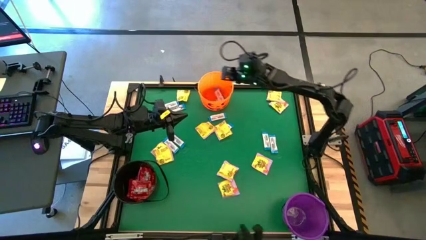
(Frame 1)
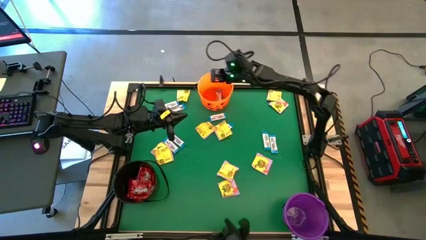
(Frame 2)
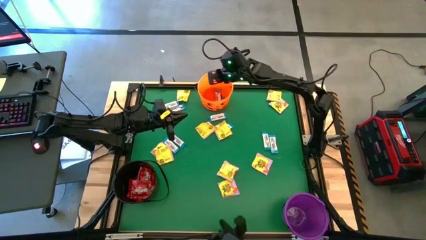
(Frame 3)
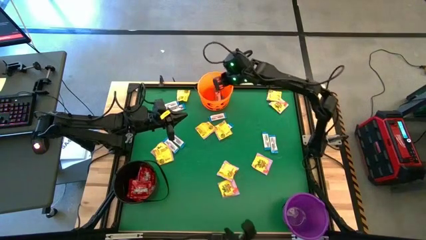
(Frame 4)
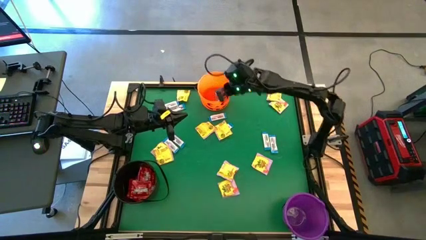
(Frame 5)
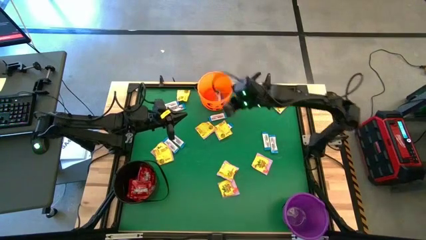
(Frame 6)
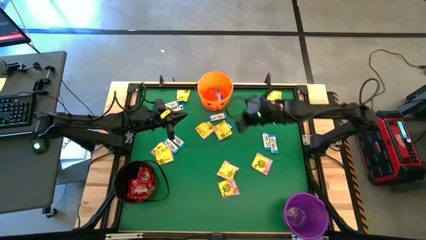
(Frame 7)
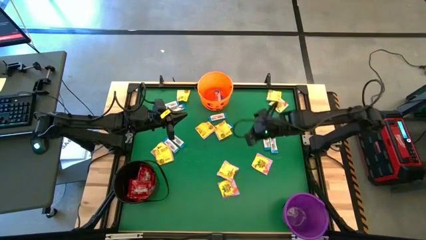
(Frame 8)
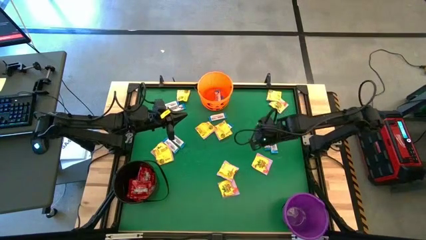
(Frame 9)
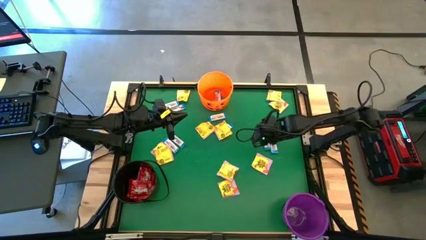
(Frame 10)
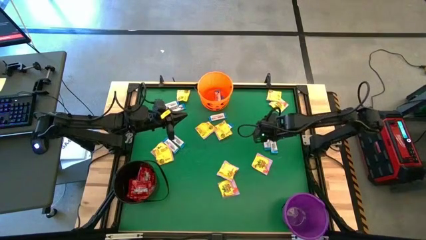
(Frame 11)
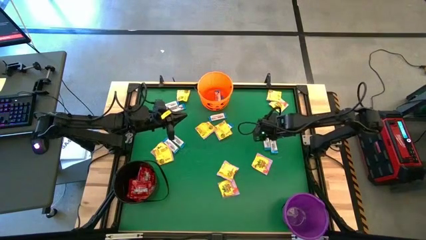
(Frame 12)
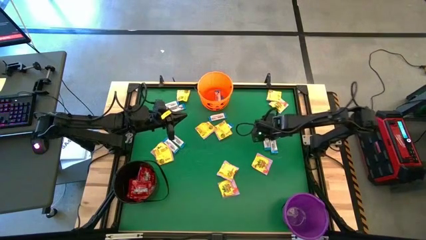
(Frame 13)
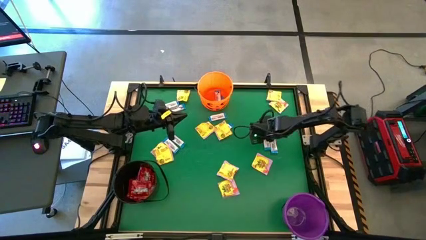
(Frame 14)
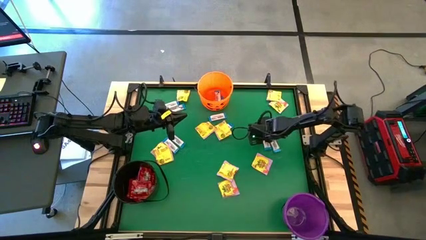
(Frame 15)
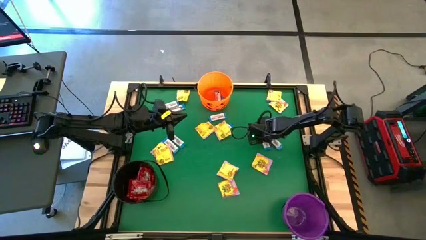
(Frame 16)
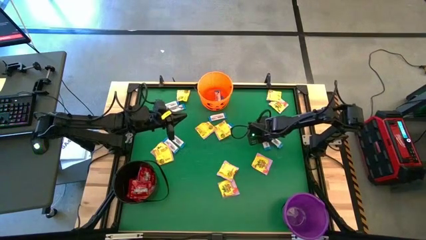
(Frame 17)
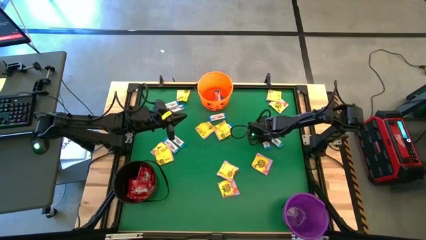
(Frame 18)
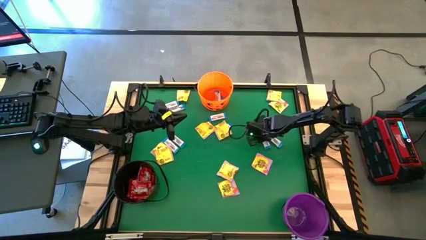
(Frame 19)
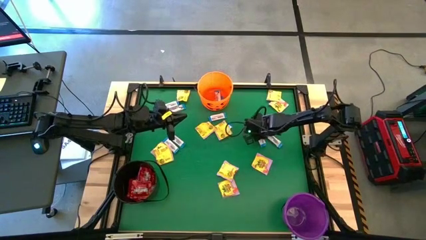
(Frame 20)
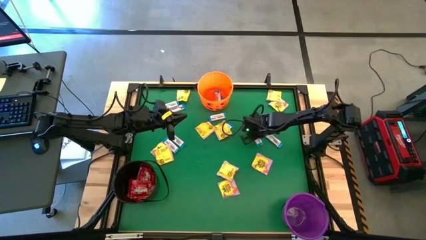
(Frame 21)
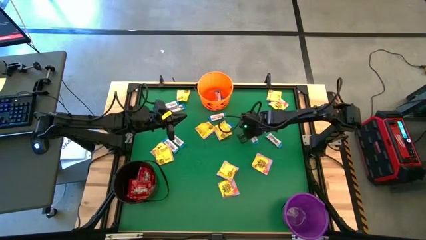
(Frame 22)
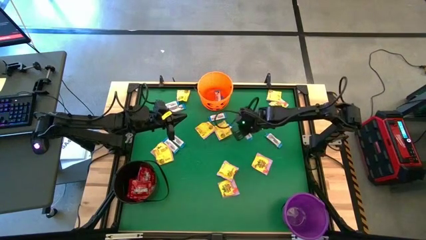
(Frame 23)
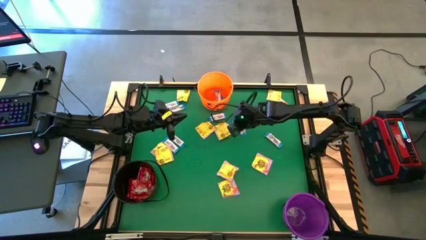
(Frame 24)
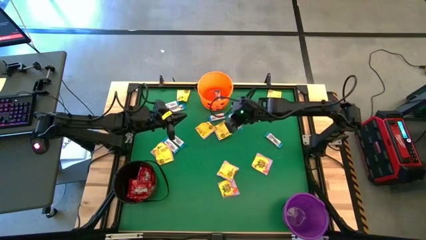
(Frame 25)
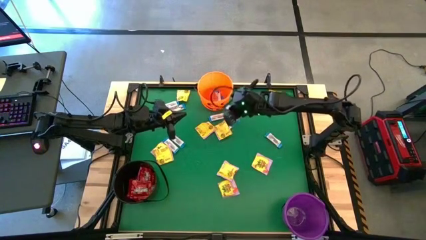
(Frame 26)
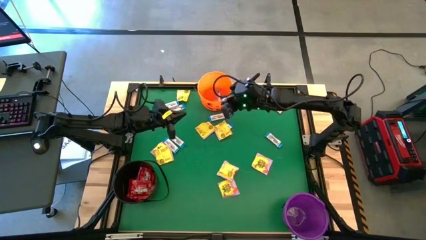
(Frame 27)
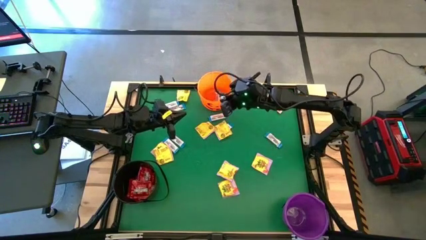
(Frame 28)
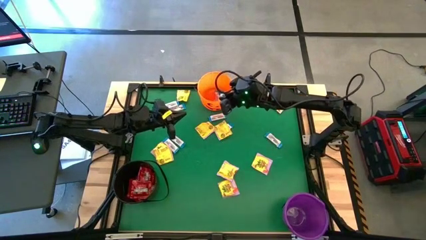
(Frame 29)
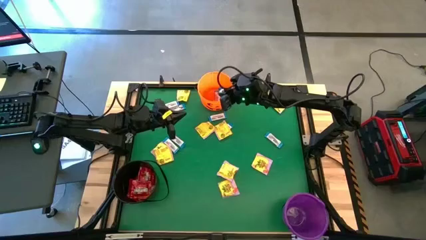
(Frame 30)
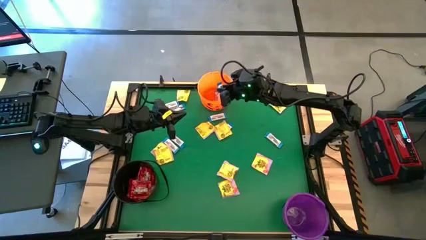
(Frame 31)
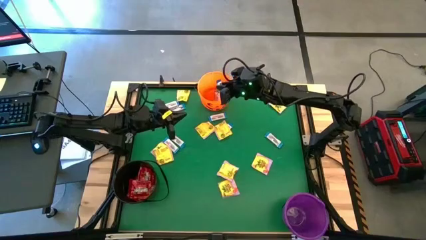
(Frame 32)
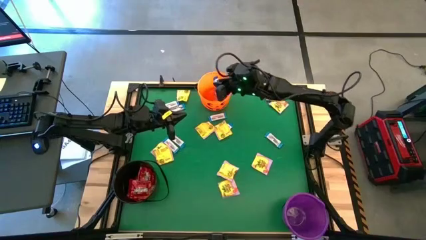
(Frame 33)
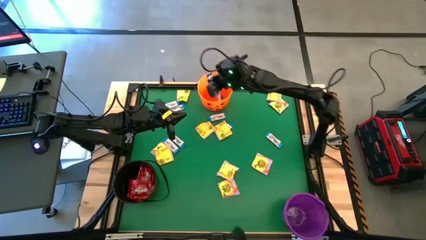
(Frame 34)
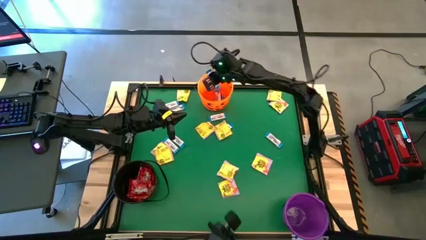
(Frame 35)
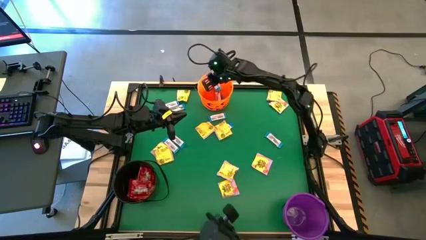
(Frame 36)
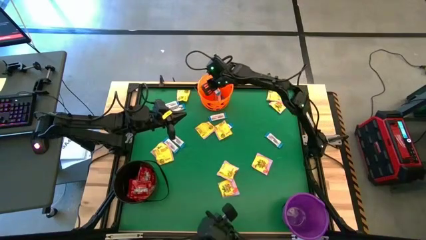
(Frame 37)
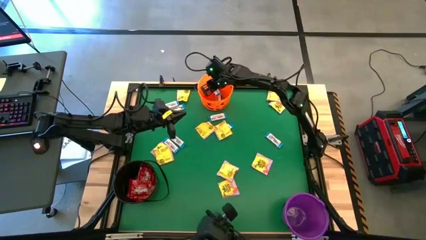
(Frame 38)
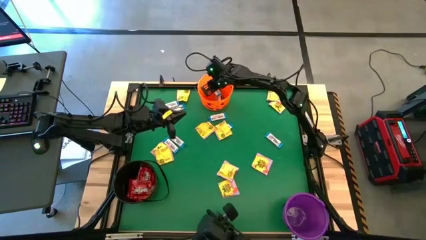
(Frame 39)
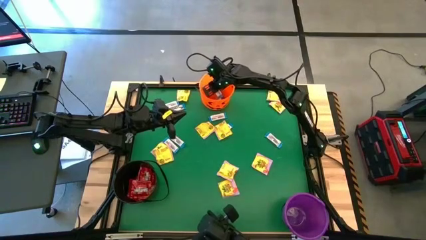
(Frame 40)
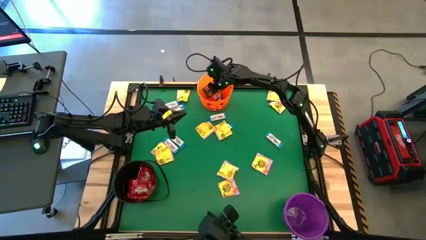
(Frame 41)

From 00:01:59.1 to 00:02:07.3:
Task: Sort candy by brand, put in halloween buckets
Put the white chocolate into the orange bucket

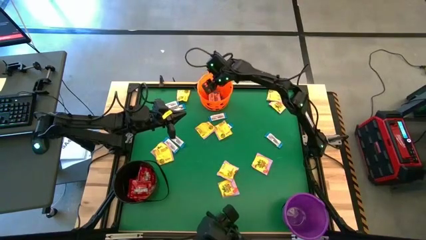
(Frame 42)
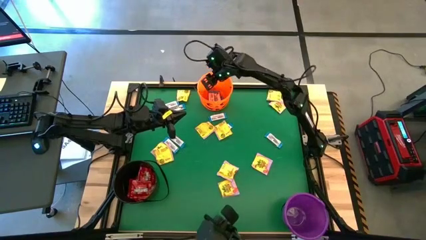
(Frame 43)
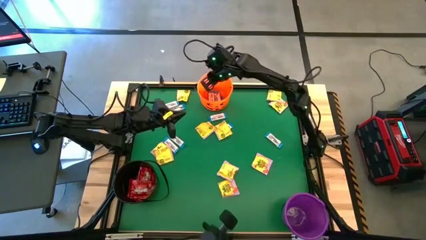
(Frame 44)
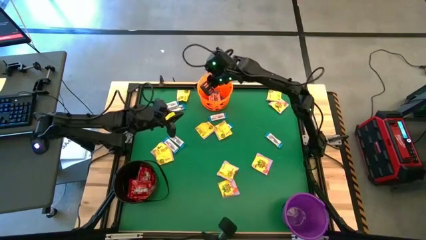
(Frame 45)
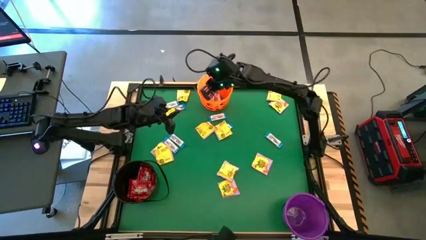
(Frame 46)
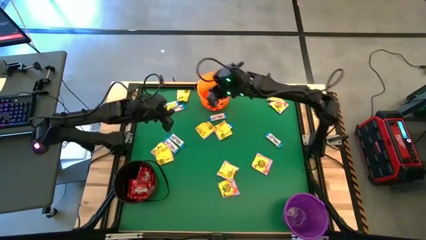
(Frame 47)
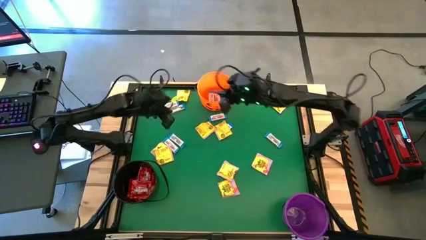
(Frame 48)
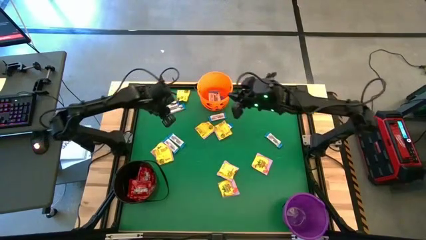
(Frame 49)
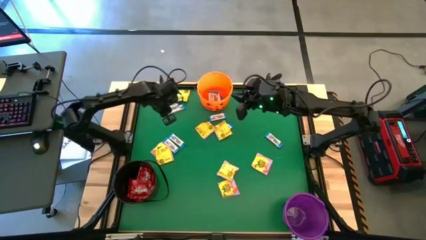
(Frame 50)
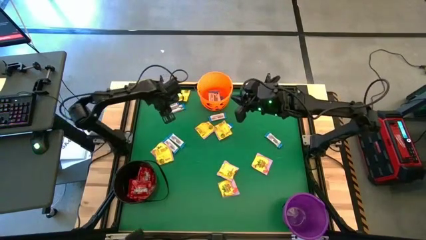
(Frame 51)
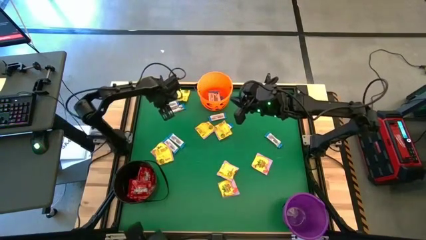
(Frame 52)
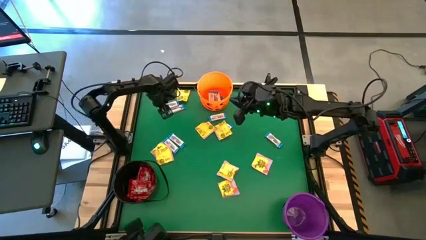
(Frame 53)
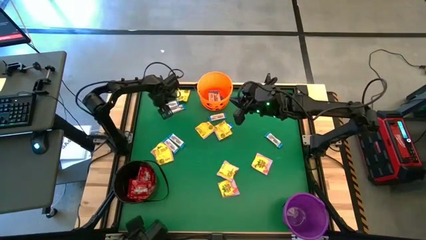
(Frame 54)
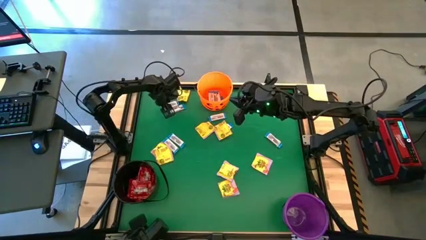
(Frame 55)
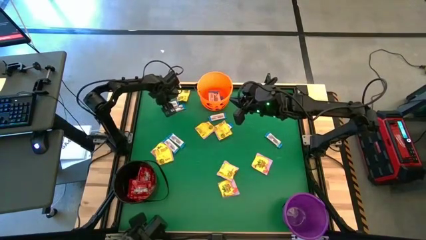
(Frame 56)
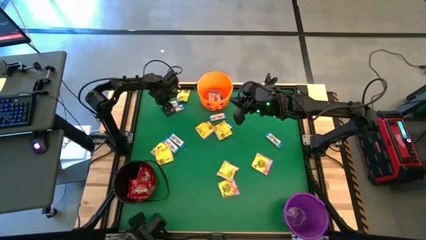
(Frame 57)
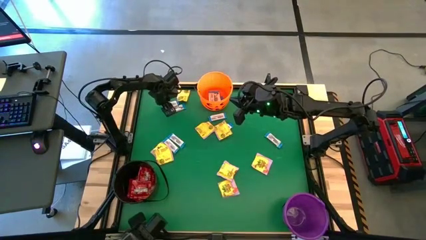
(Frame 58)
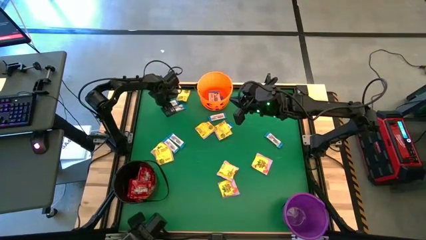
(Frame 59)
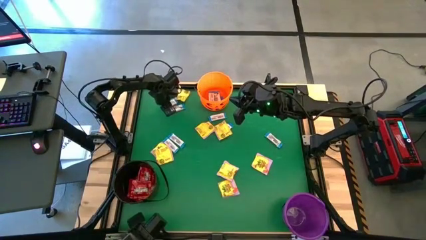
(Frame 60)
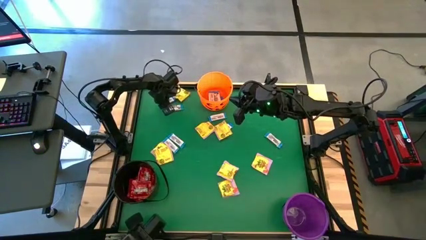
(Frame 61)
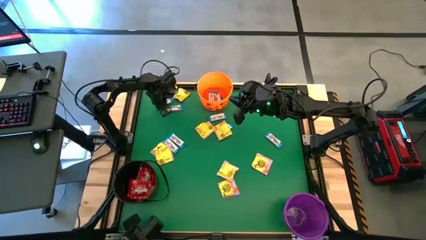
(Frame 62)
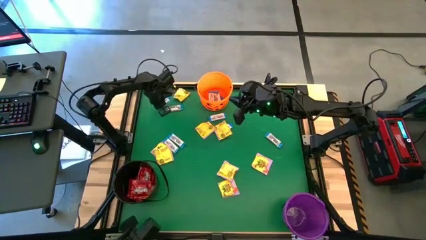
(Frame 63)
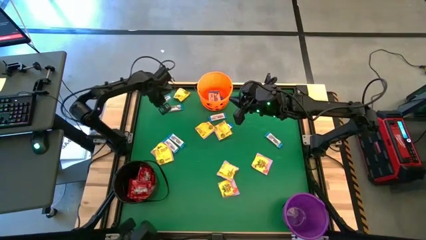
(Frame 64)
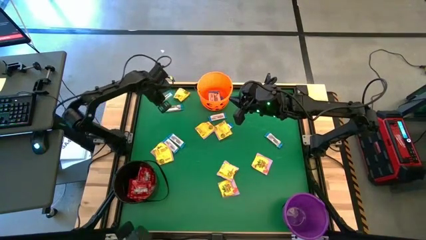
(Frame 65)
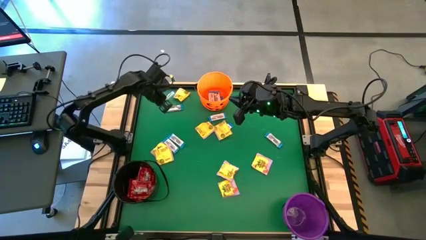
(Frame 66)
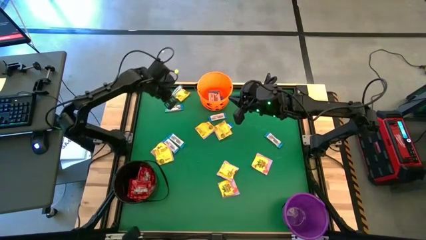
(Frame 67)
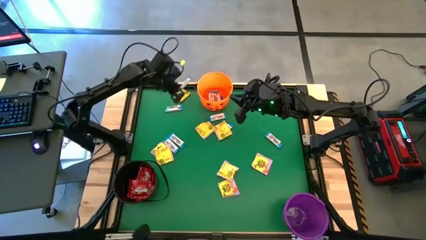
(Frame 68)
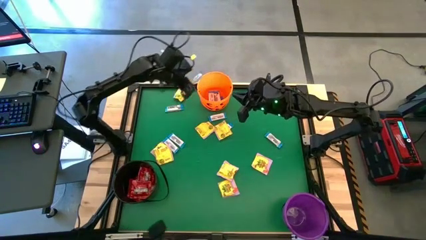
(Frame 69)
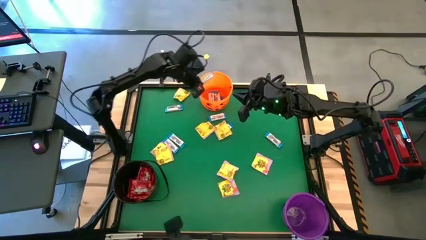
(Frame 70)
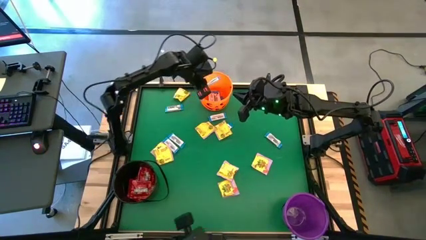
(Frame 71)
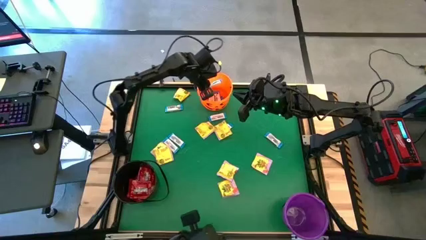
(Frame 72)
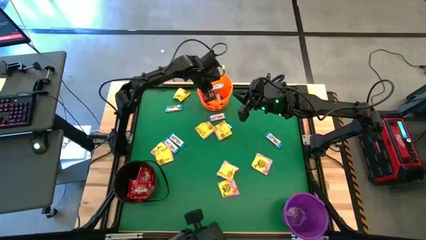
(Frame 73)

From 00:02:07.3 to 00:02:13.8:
Put the white chocolate into the orange bucket

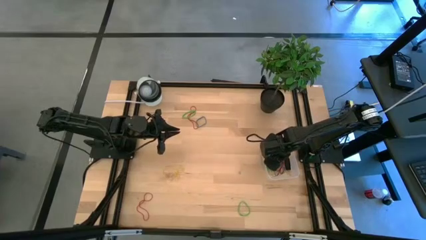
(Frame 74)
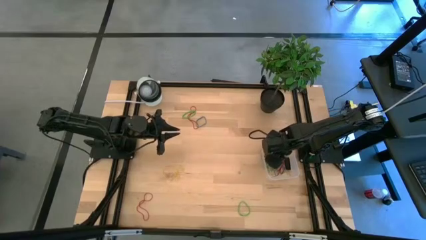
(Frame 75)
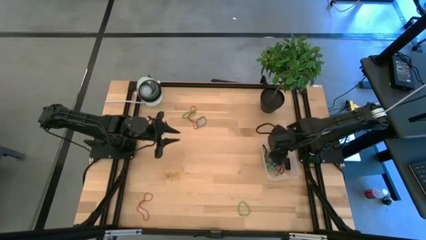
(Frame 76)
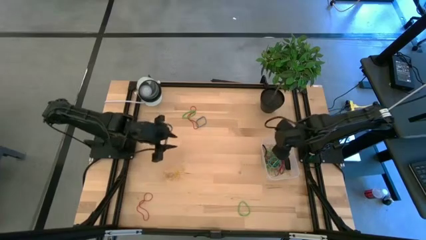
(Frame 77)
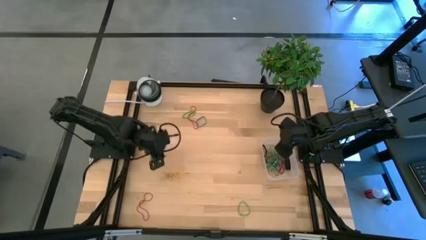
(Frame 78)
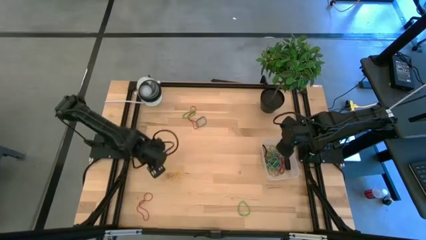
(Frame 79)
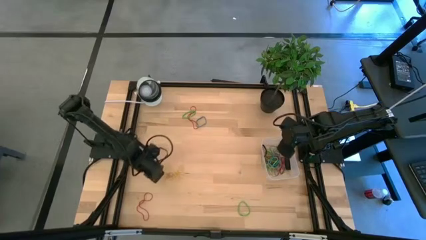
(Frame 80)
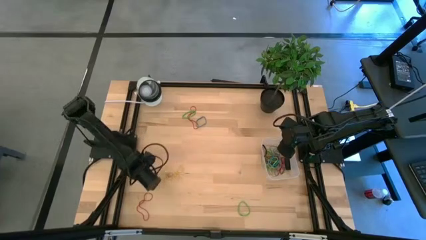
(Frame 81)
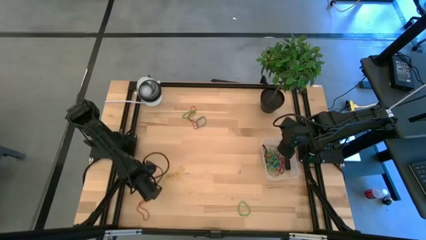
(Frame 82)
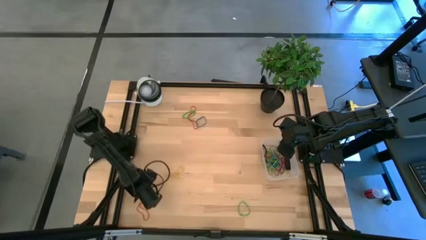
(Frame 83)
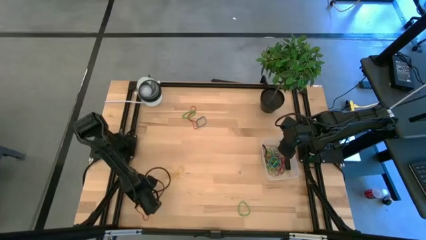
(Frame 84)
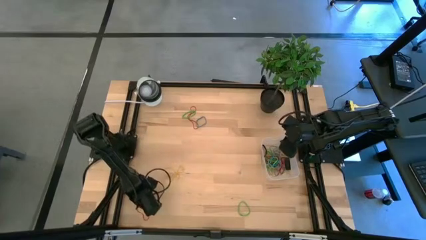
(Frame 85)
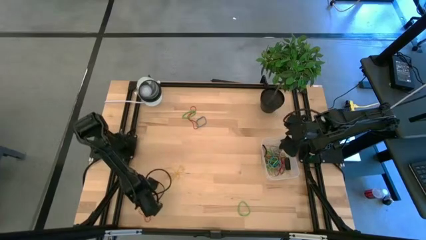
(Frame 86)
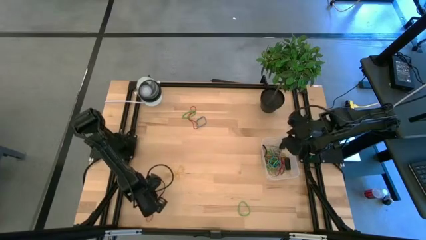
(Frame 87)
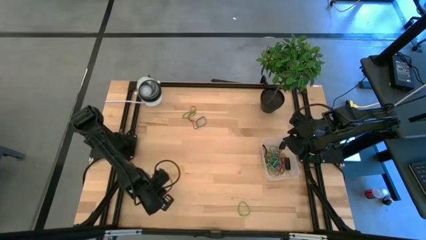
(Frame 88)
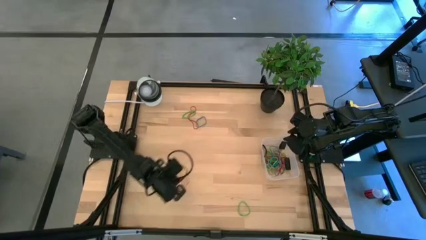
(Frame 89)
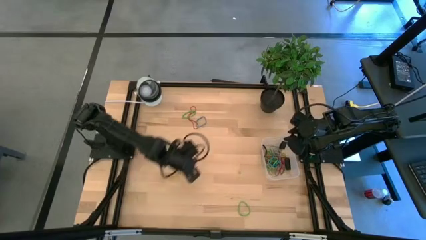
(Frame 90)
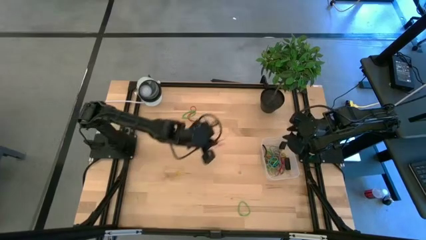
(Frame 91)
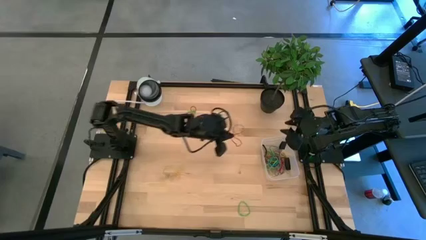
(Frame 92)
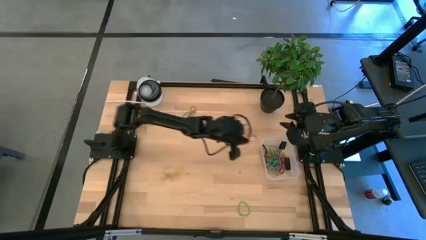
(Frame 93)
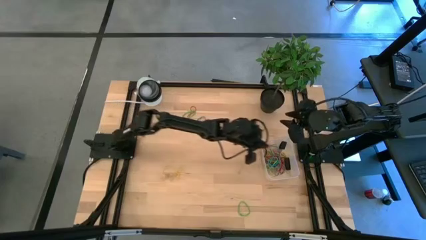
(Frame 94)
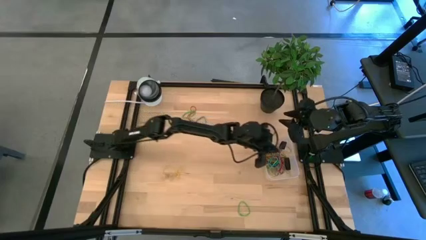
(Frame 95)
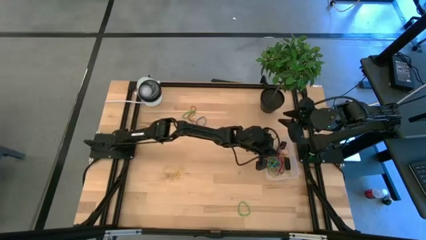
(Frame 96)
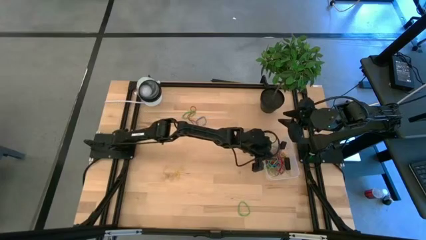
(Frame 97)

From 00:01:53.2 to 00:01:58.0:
Task: Pick and place rubber bands into bin
Put the red rubber band into the transparent bin
